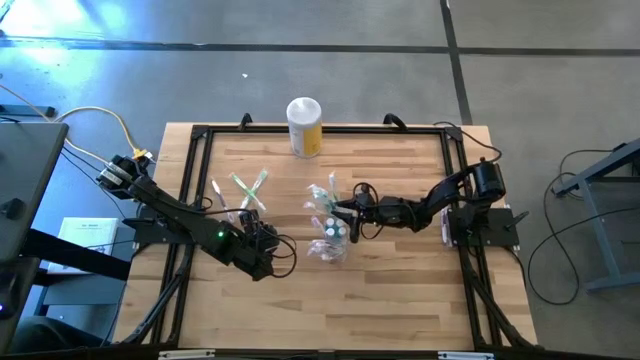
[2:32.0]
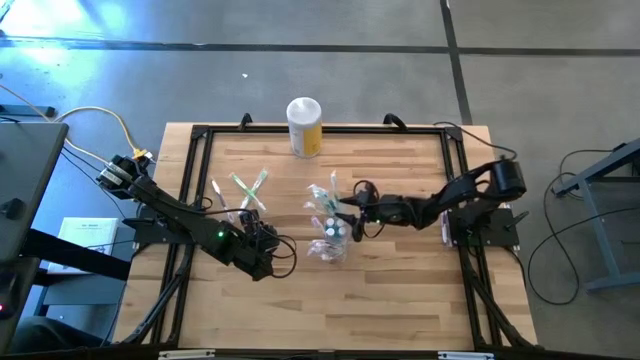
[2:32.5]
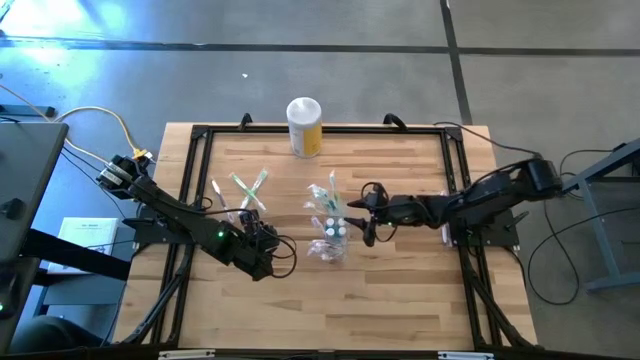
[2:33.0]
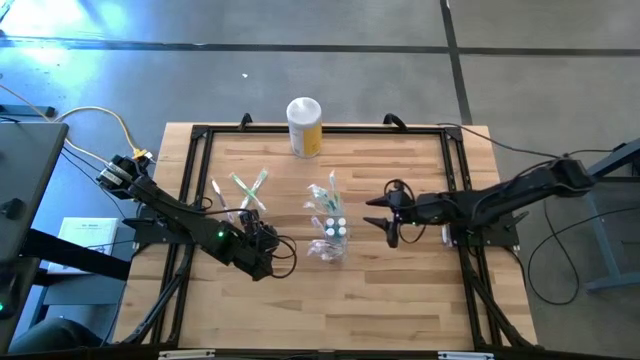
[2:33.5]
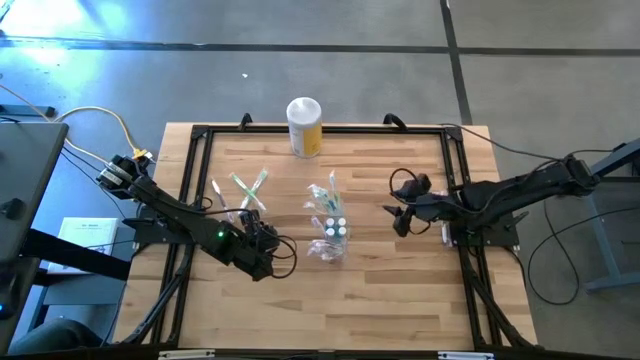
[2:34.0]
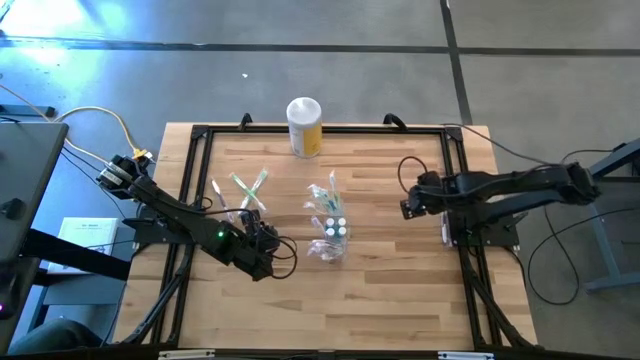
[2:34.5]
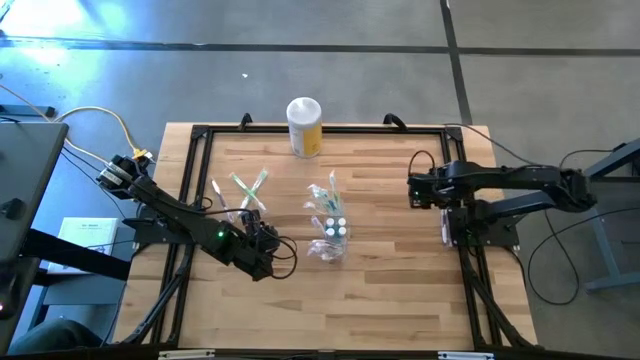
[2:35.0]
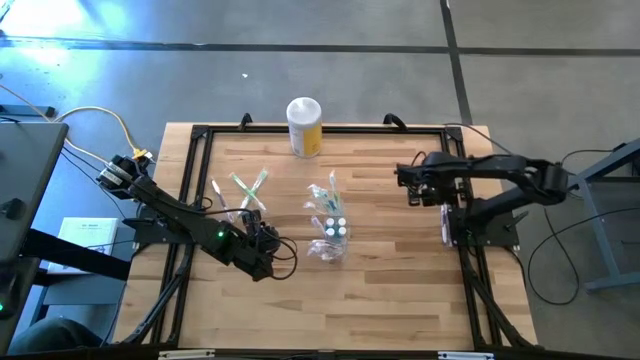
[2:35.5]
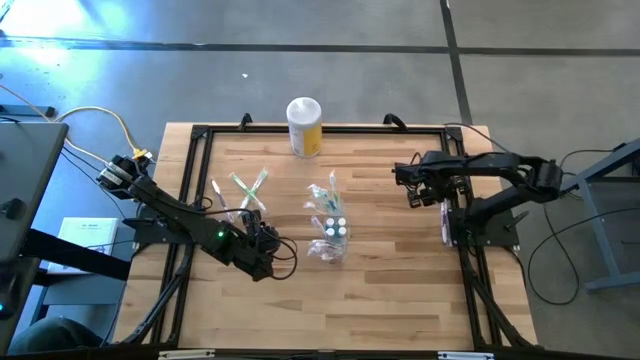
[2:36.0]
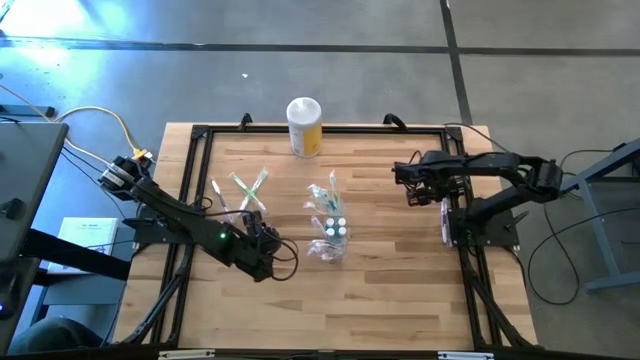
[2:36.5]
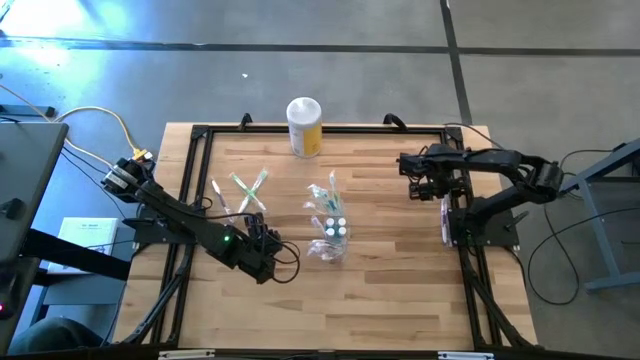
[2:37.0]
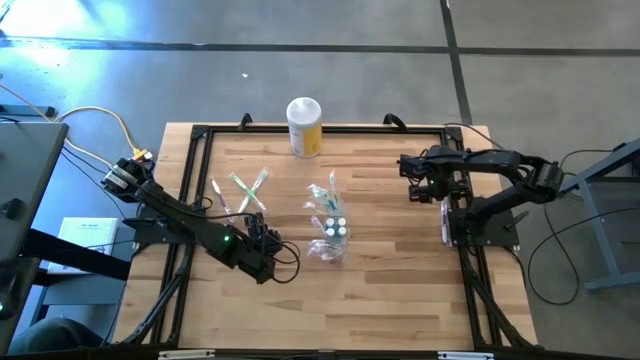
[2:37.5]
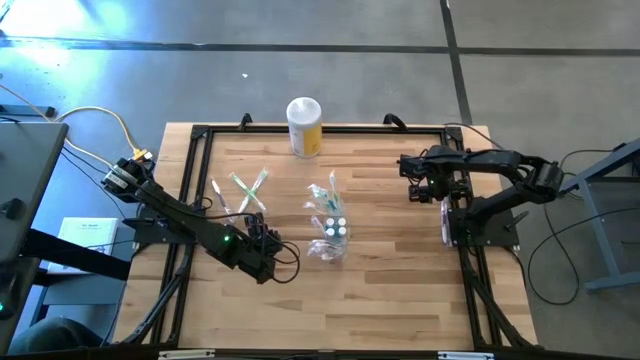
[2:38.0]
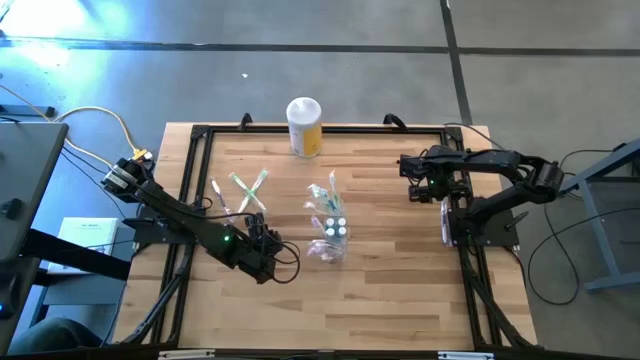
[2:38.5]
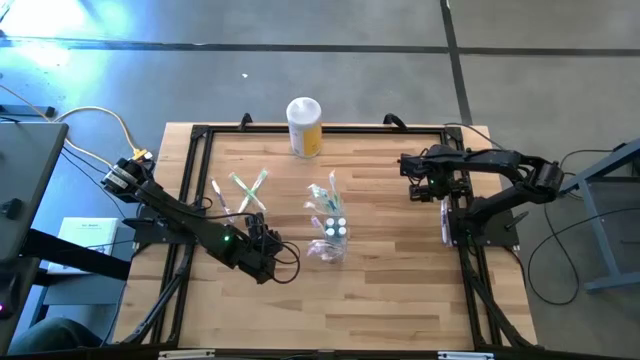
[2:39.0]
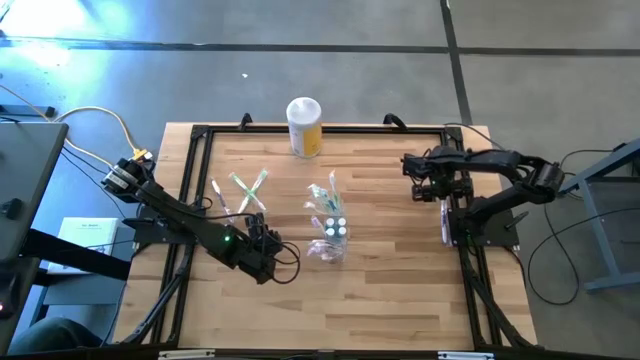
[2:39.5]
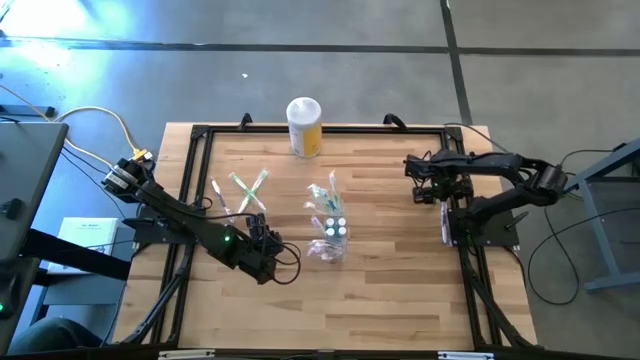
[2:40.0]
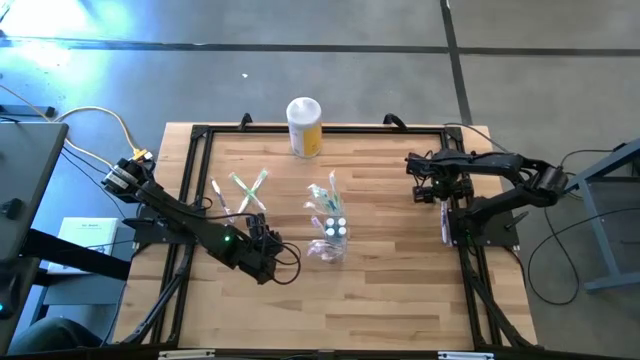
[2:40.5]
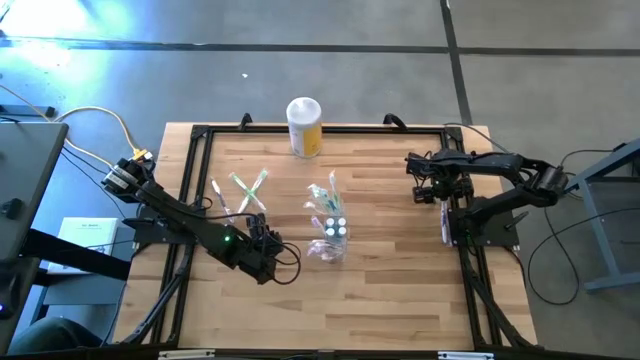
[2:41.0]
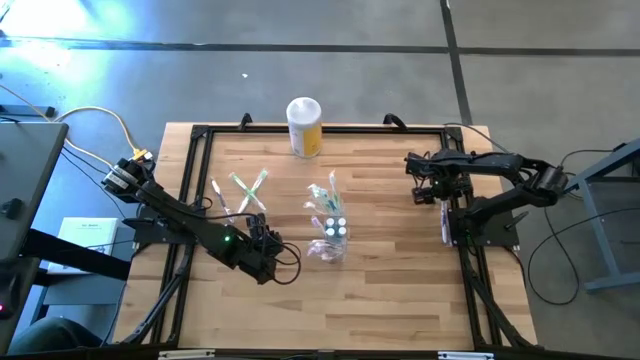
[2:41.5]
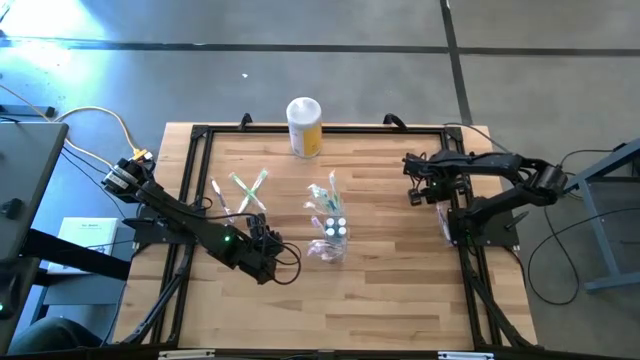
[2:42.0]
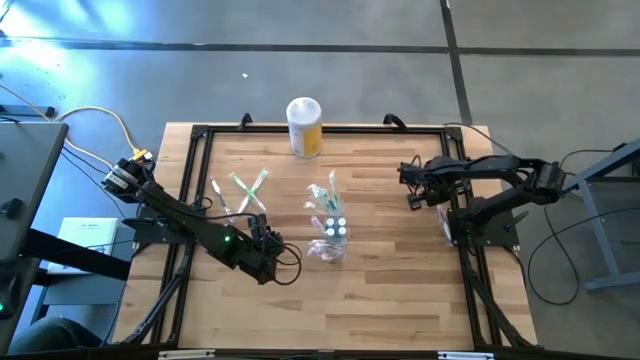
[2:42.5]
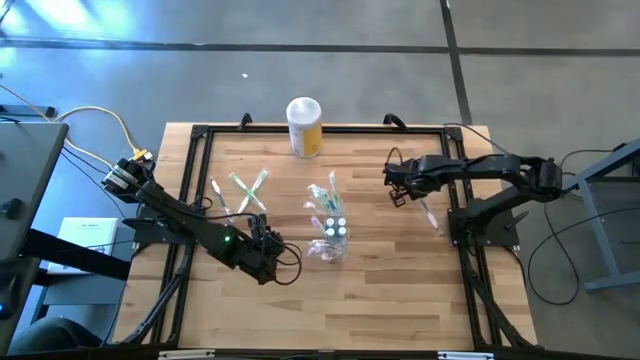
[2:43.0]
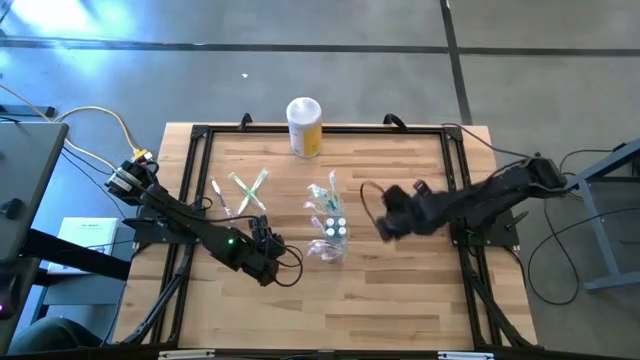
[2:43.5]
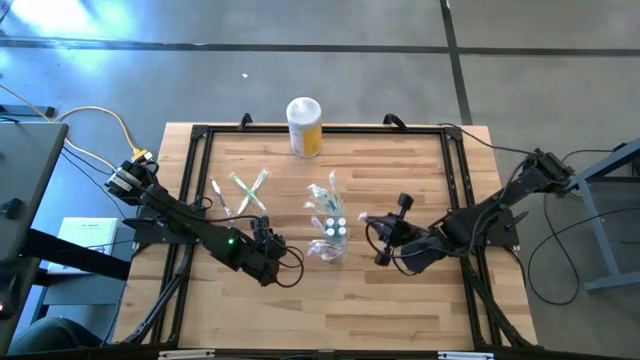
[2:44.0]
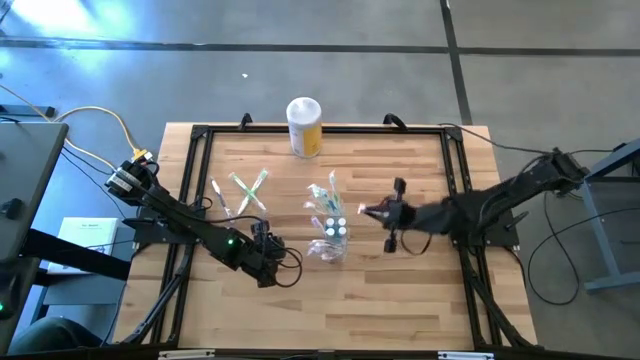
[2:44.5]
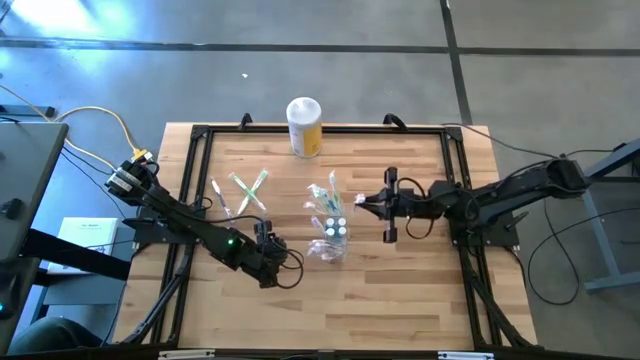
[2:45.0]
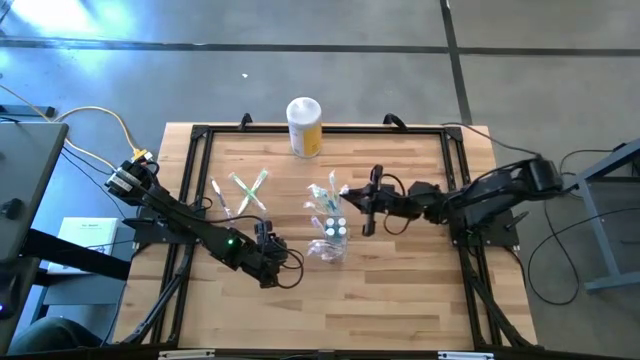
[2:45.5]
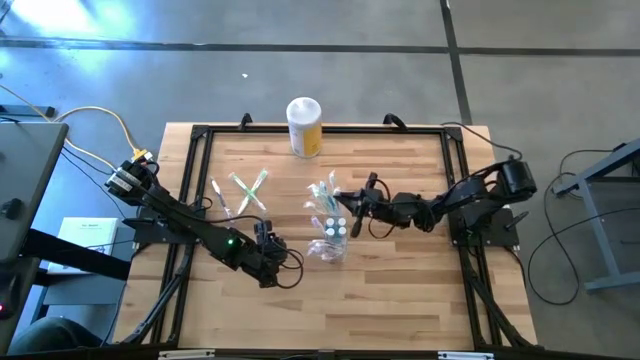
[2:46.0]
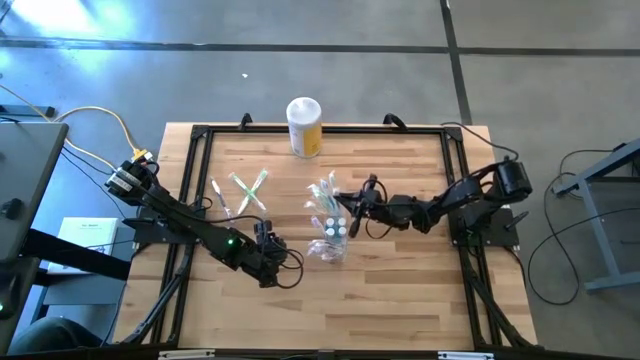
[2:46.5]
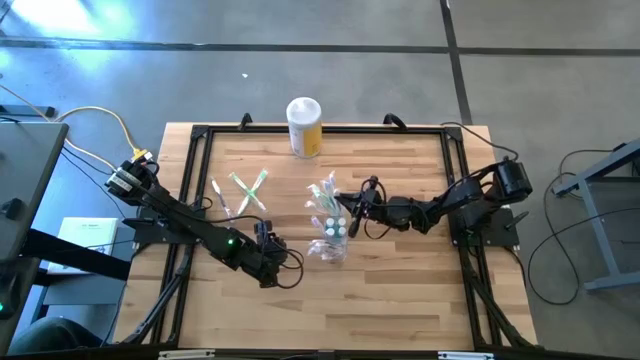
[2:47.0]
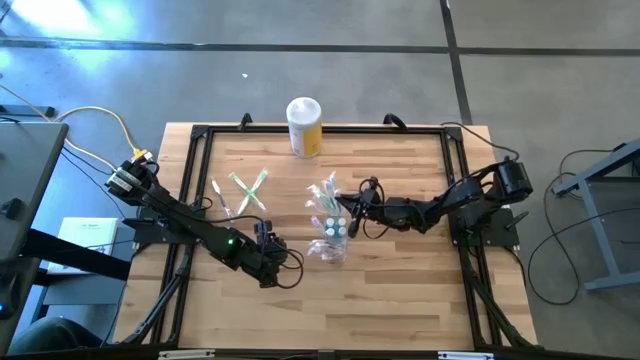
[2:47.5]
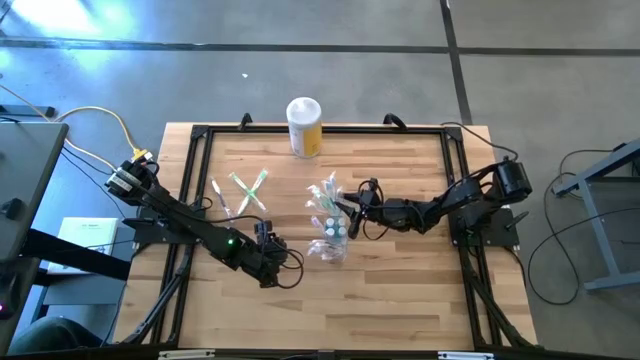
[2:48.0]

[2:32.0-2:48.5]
Task: Pick & Place toothbrushing station
Put the purple toothbrush into the transparent organizer

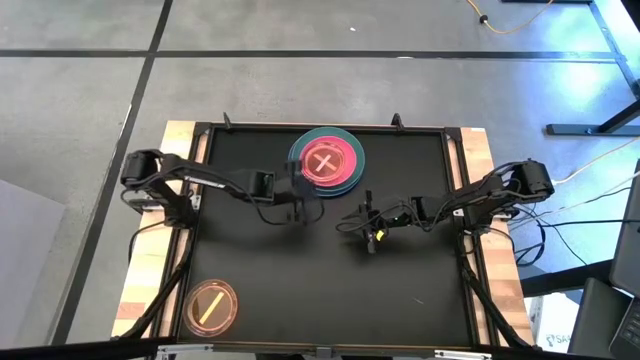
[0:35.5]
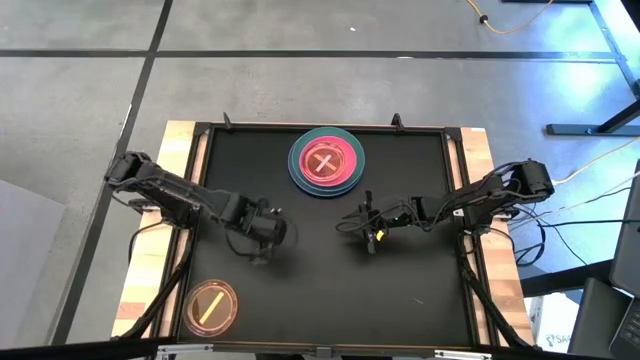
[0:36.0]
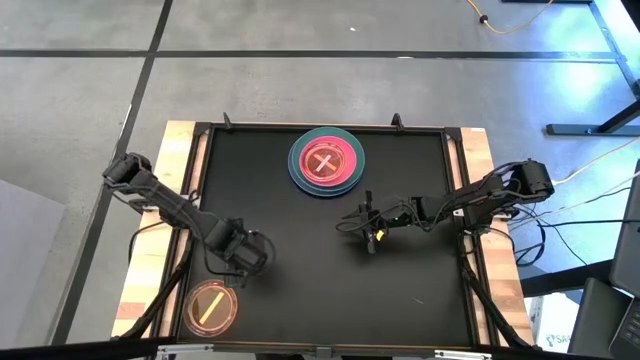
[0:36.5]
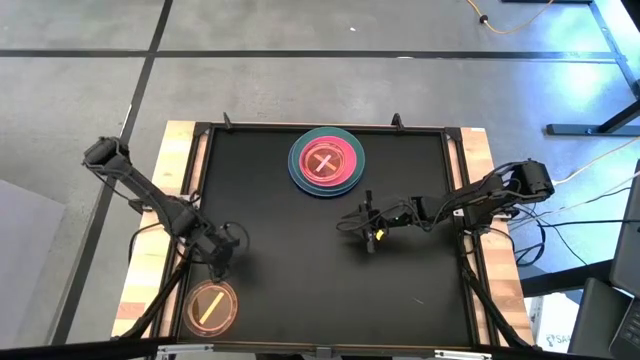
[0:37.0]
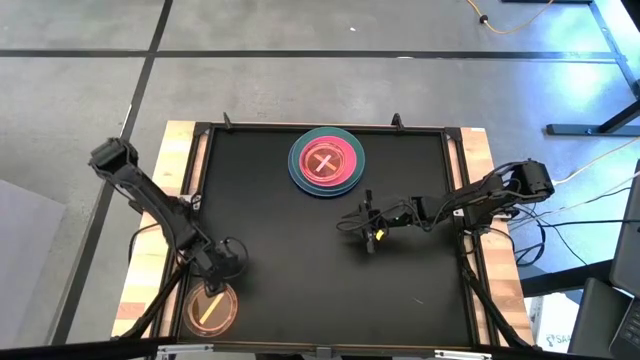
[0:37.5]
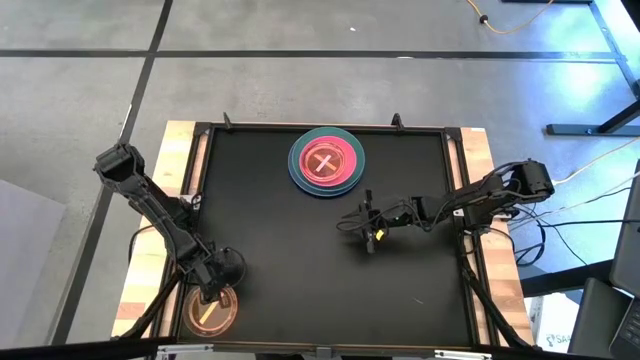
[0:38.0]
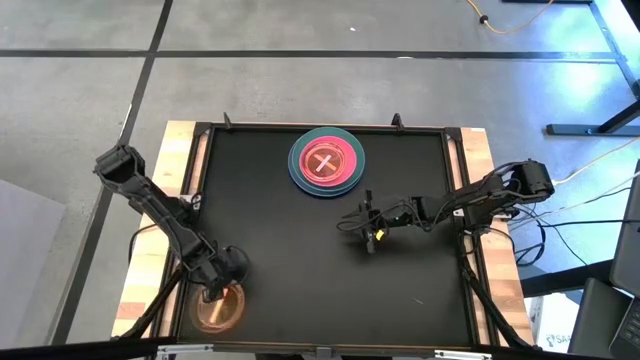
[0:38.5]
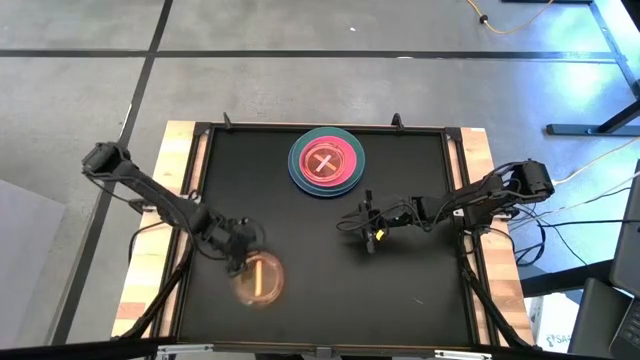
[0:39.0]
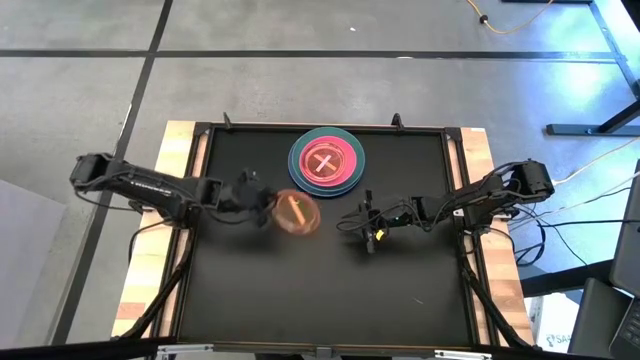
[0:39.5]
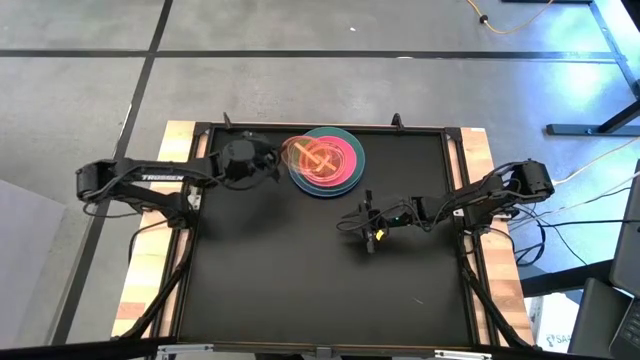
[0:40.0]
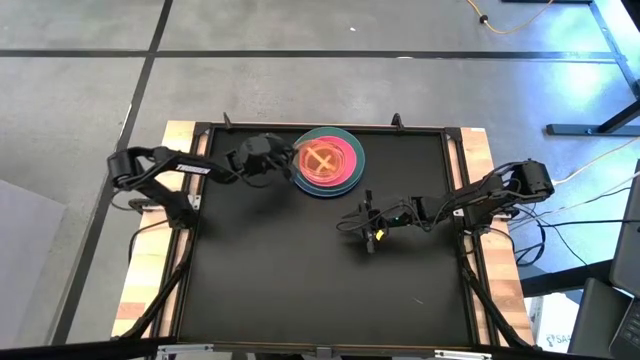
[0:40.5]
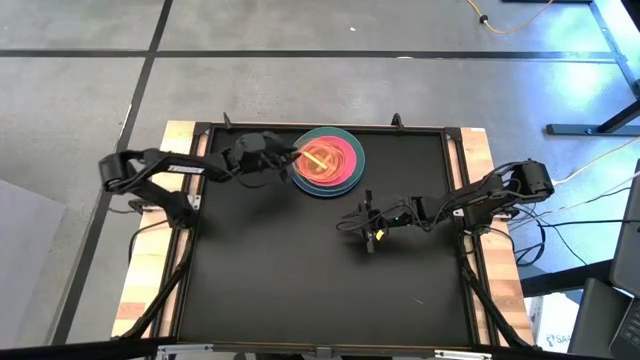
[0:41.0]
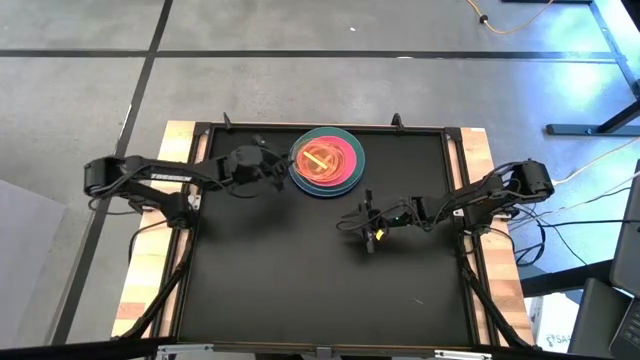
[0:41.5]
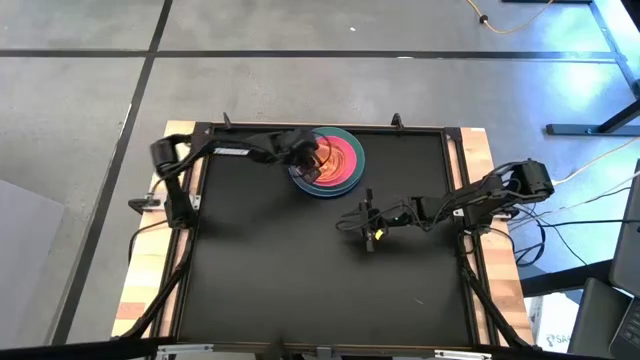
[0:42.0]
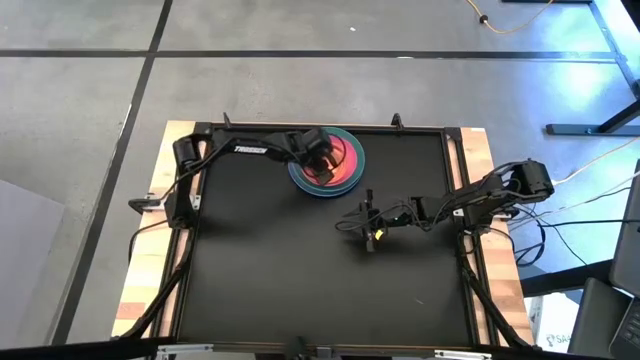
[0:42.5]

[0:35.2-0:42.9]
Task: Stack plastic plates
Stack the orange plate on top of the light pink plate
